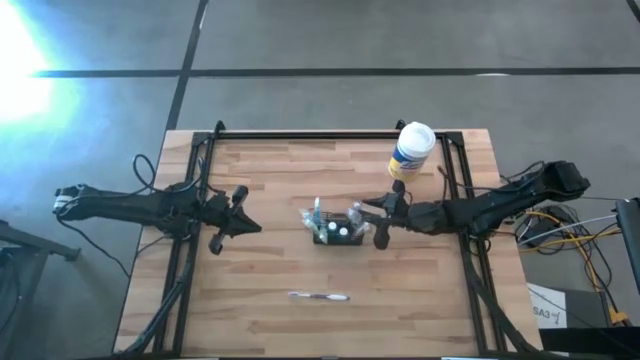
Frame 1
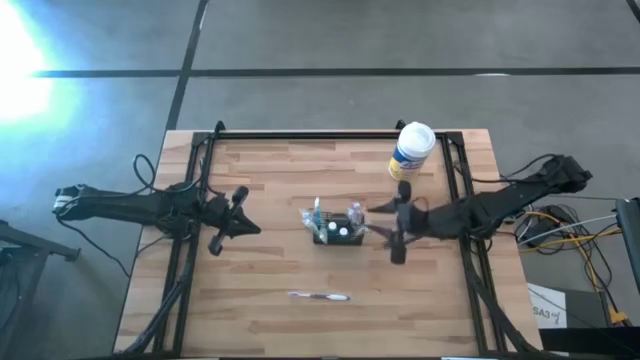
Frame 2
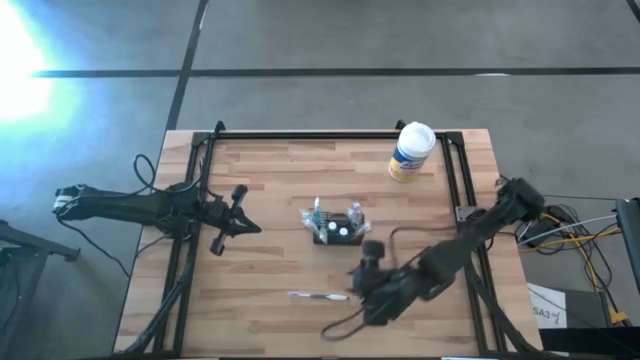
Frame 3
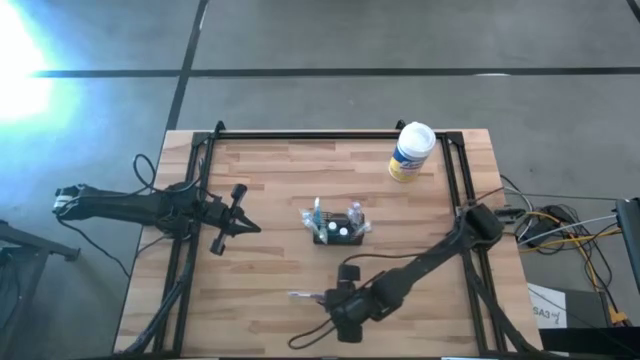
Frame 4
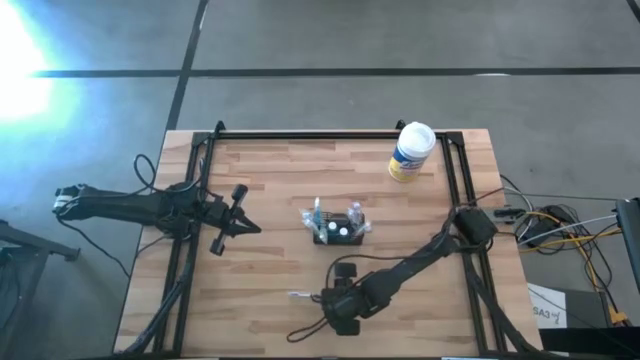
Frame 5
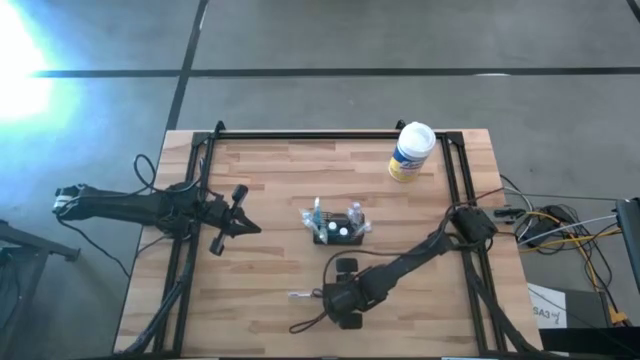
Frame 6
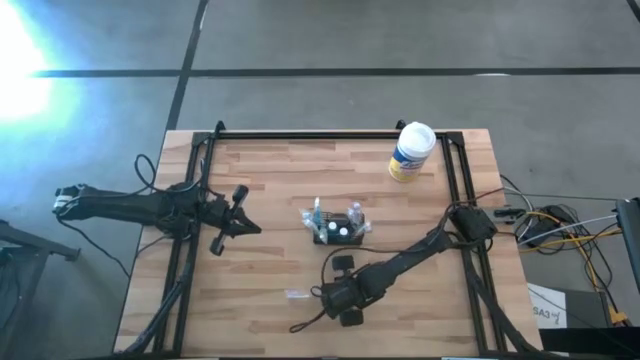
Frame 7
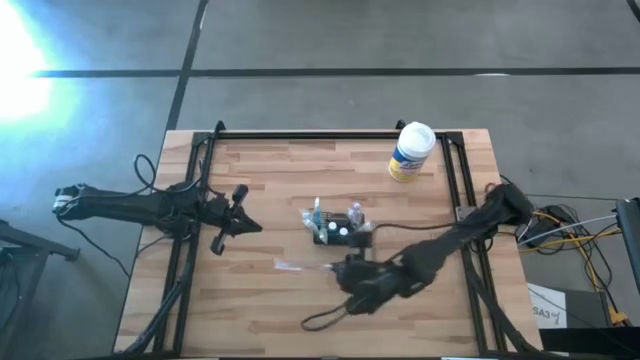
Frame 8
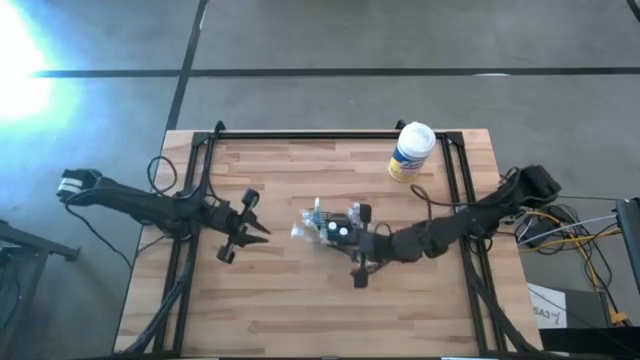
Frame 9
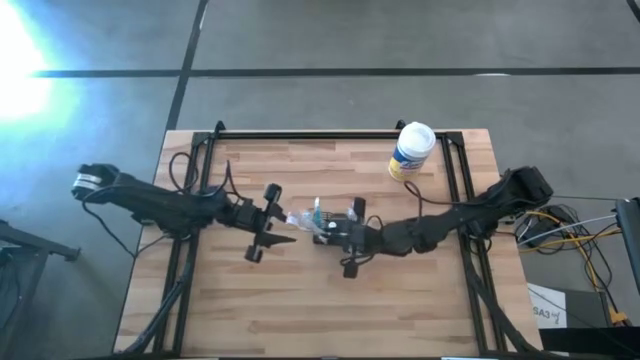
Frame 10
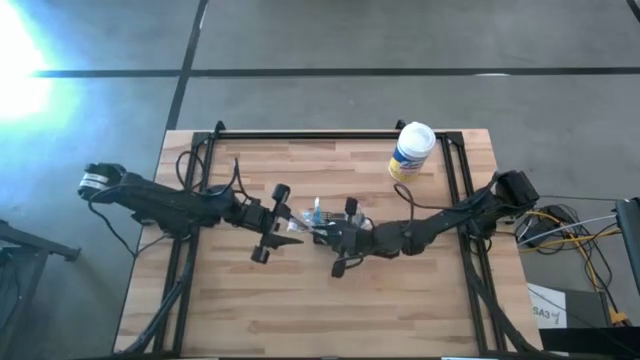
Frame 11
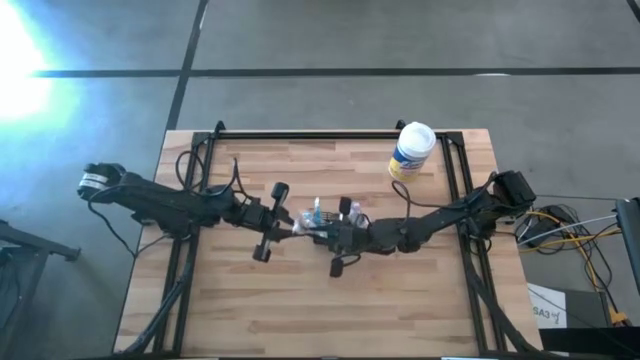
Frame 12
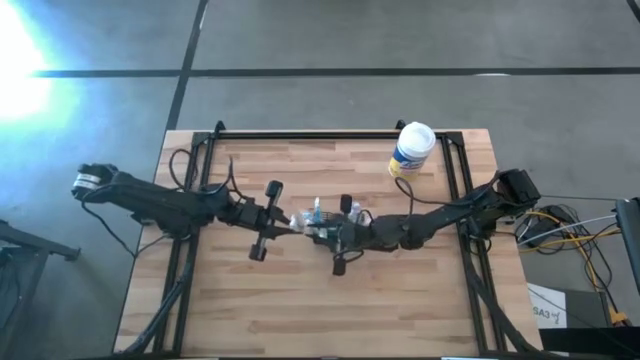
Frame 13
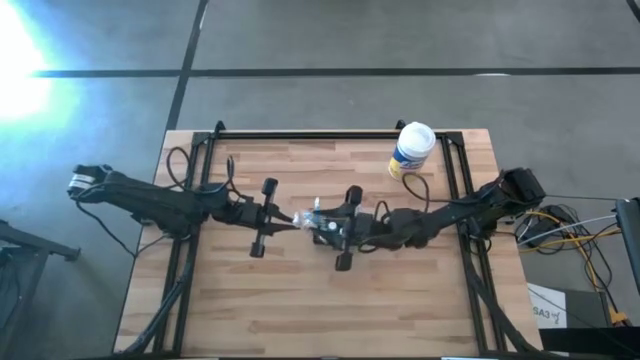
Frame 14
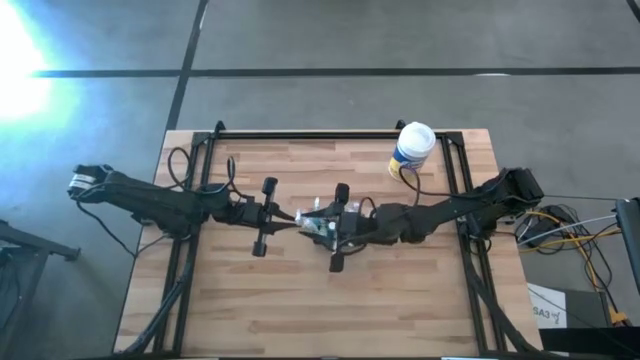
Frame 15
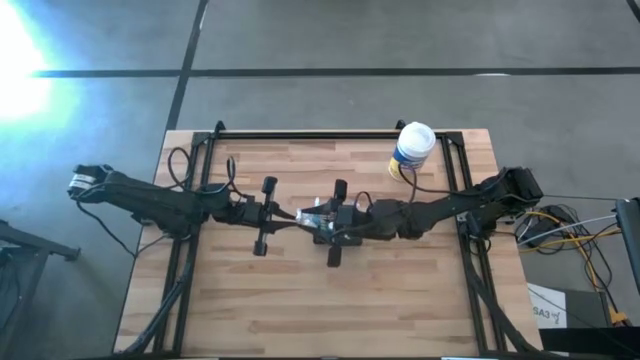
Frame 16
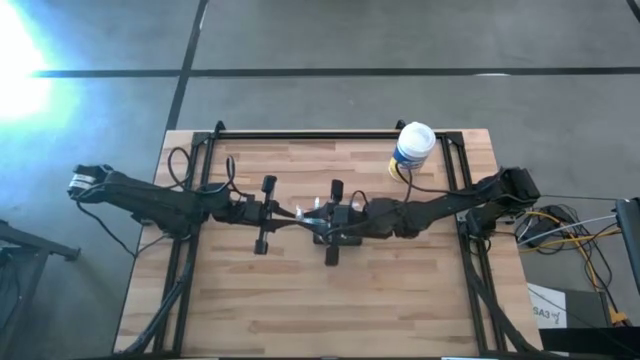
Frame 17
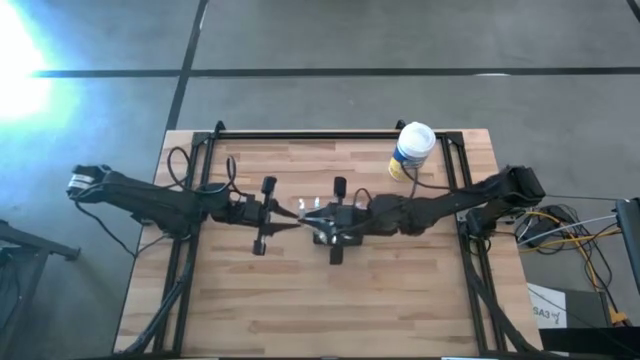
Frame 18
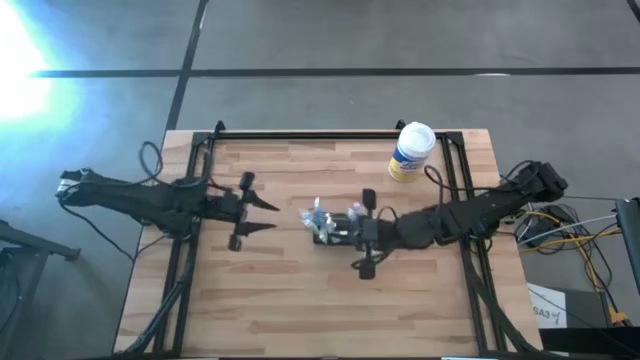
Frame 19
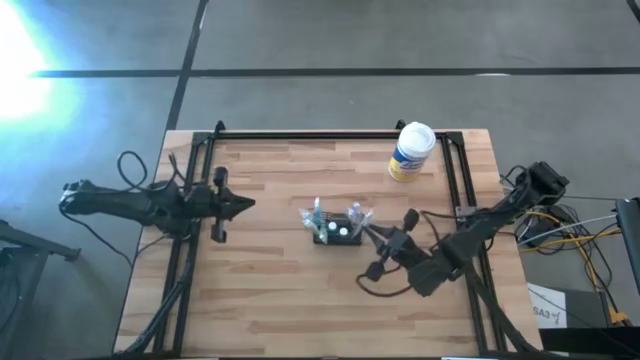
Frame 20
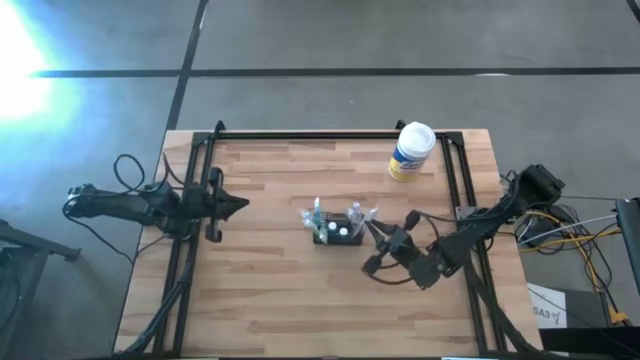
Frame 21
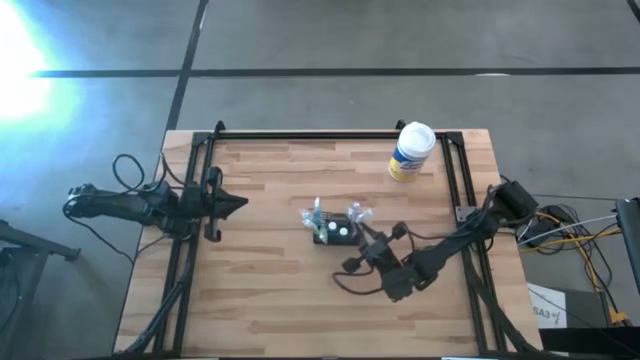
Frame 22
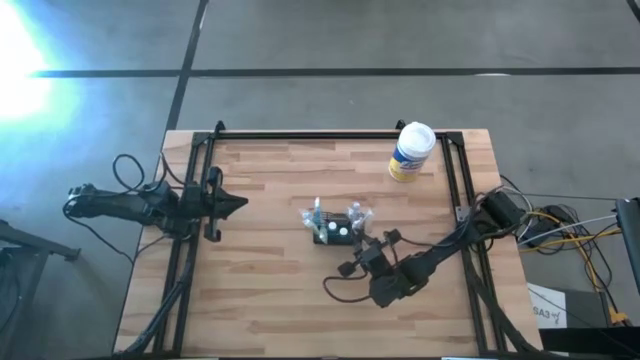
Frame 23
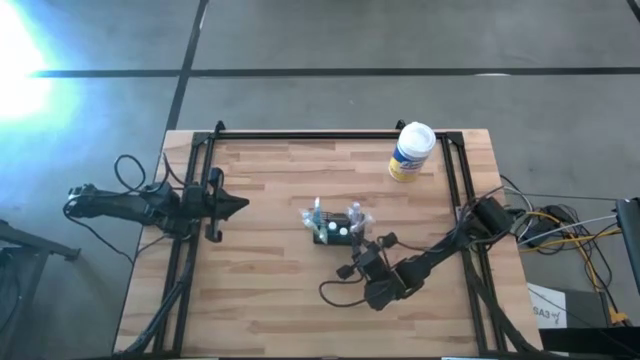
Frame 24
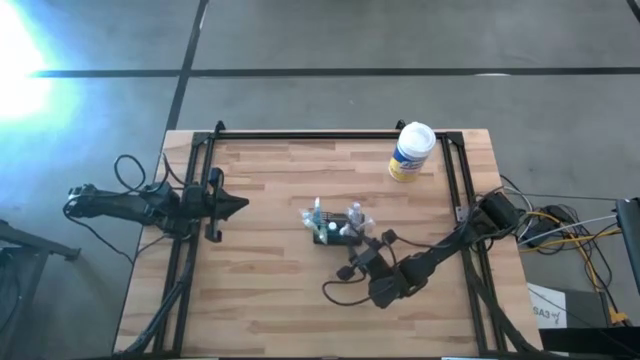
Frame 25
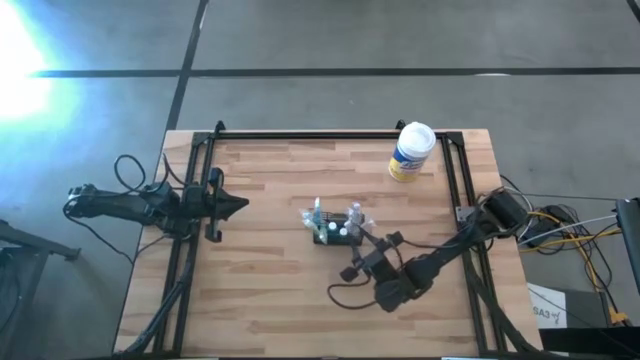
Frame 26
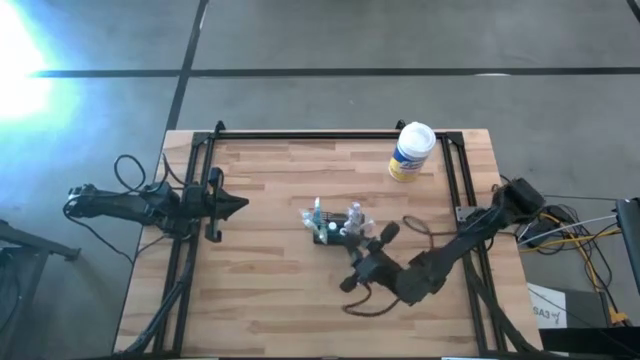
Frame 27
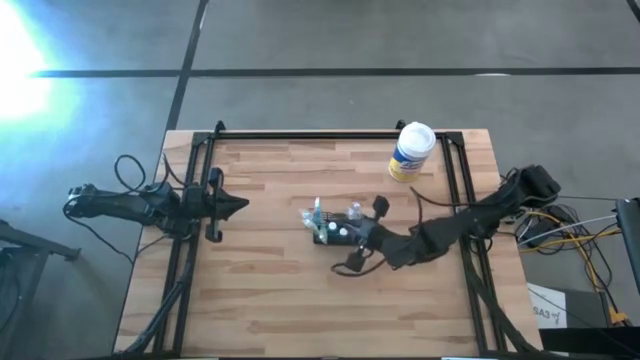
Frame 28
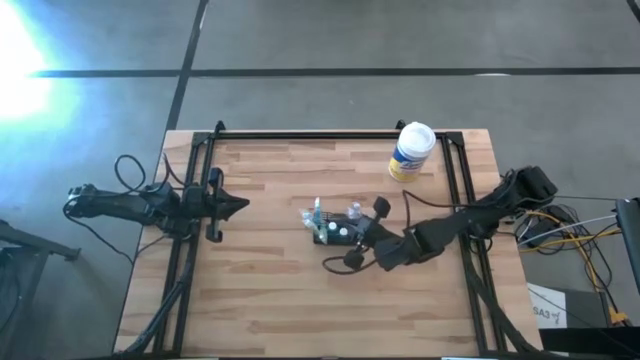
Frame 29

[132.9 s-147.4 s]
Task: Pick & Place toothbrushing station
Put the purple toothbrush into the black mesh organizer

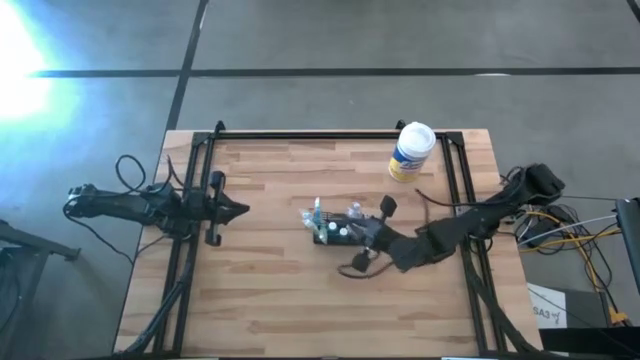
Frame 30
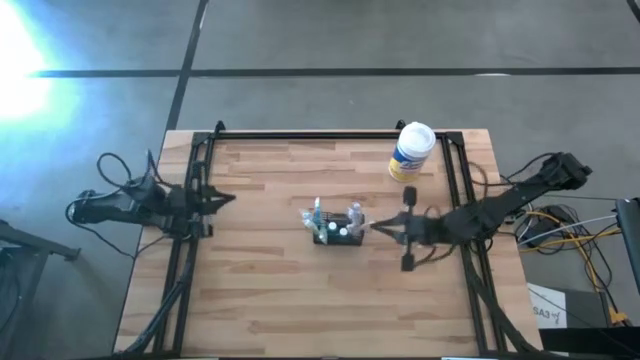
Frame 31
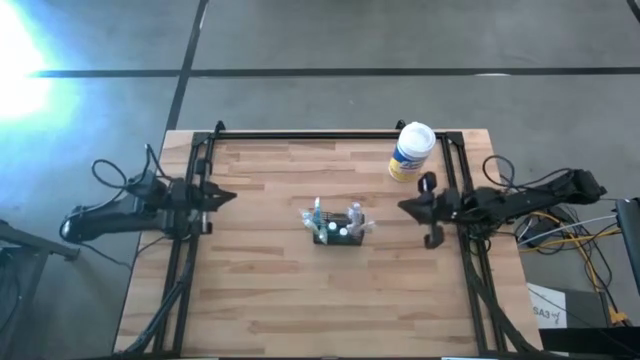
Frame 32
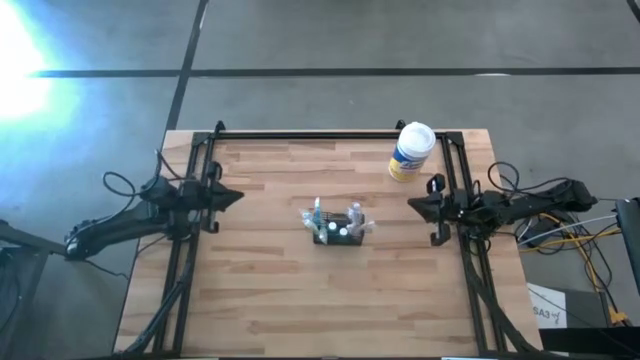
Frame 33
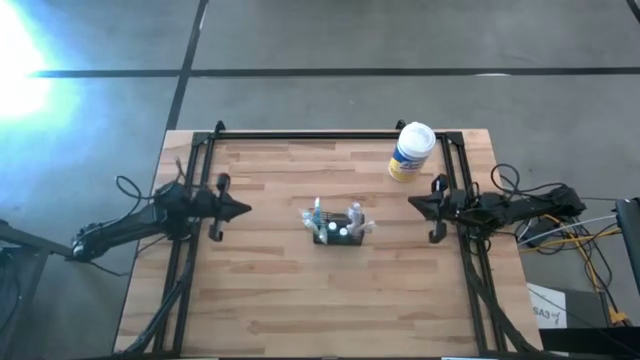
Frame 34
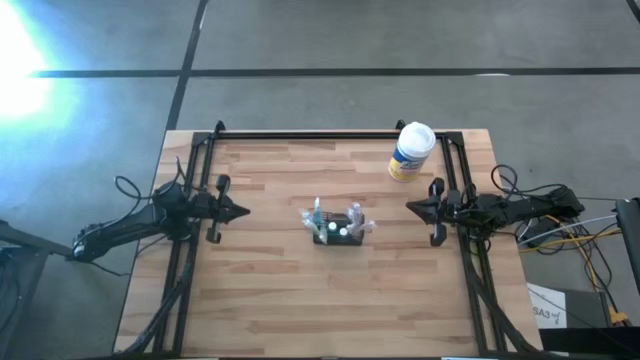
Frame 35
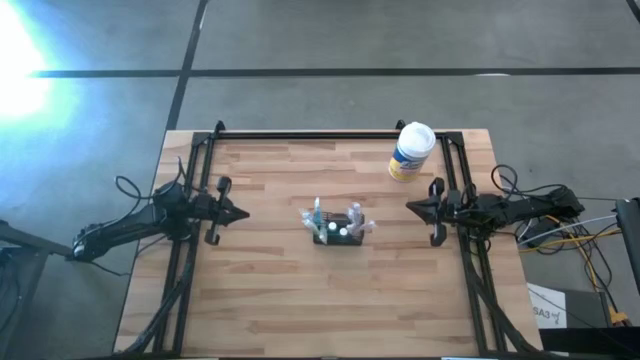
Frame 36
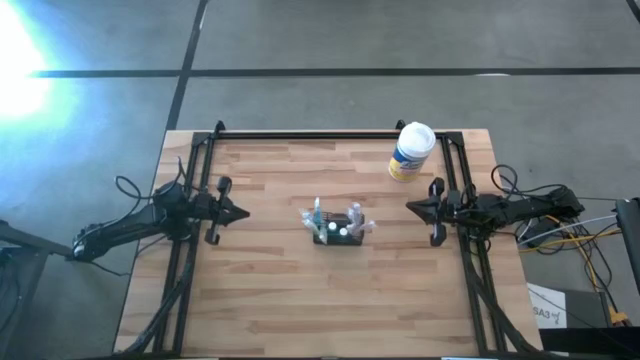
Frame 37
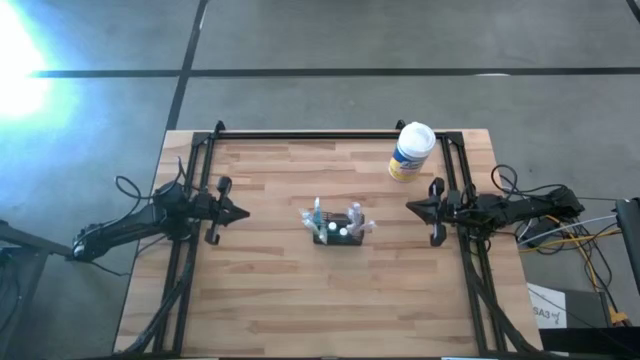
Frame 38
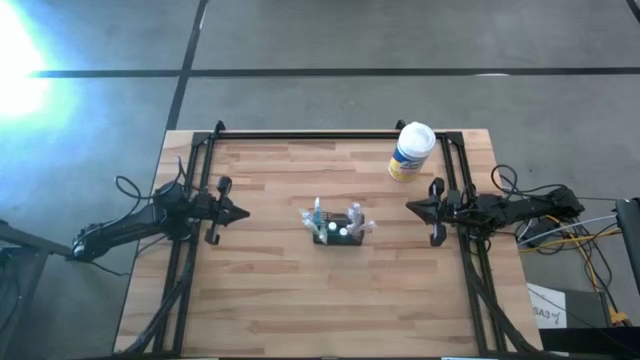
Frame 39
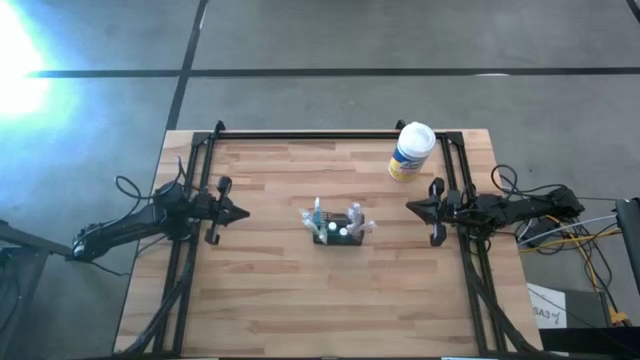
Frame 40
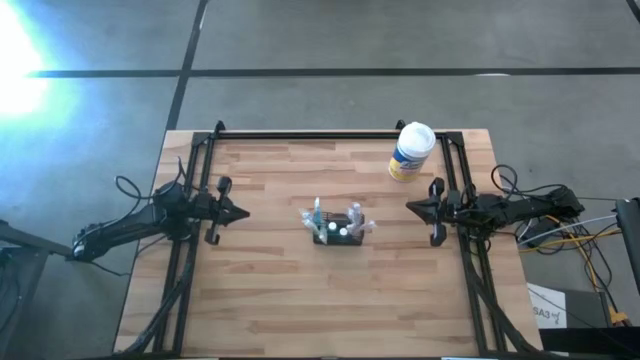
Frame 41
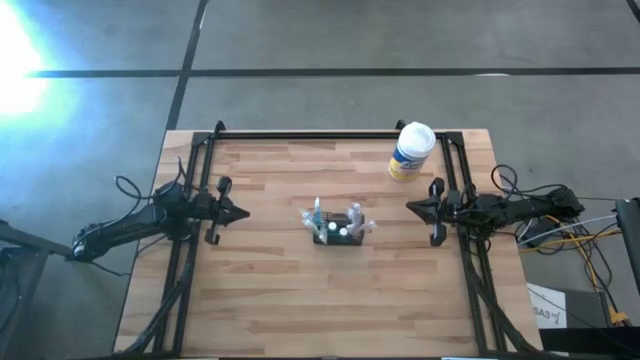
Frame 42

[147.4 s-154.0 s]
Return to Home Position

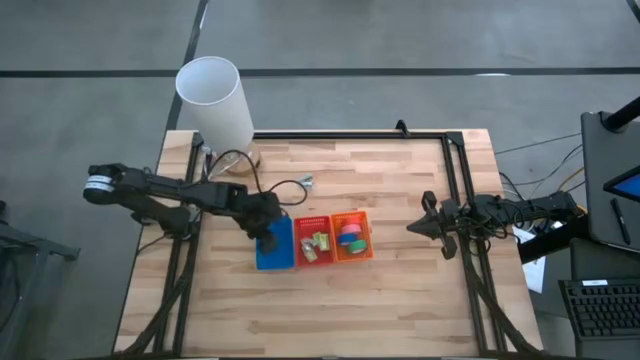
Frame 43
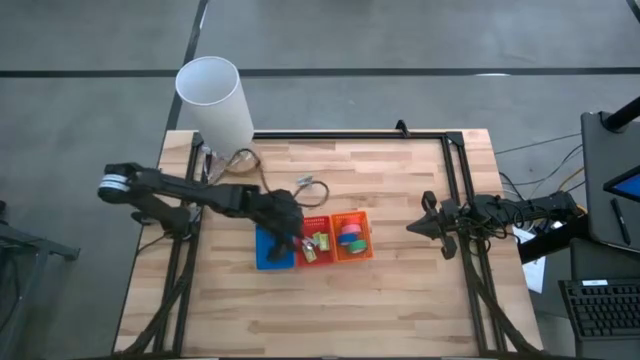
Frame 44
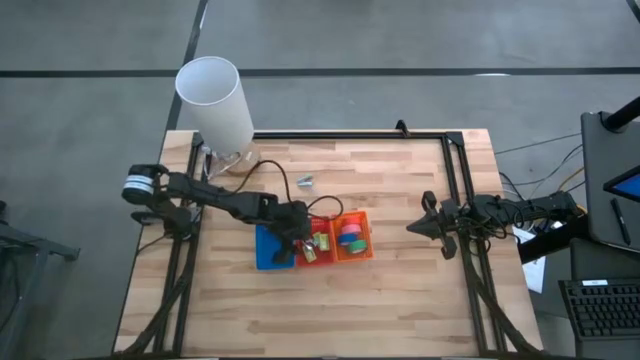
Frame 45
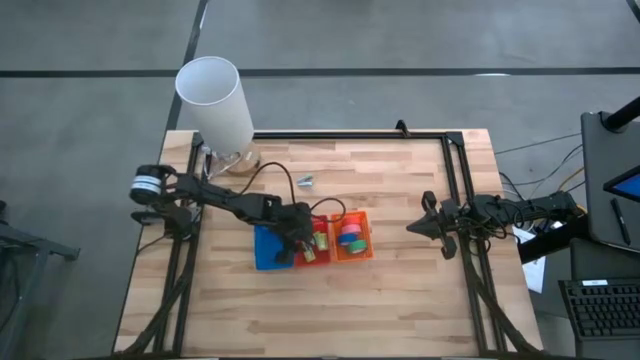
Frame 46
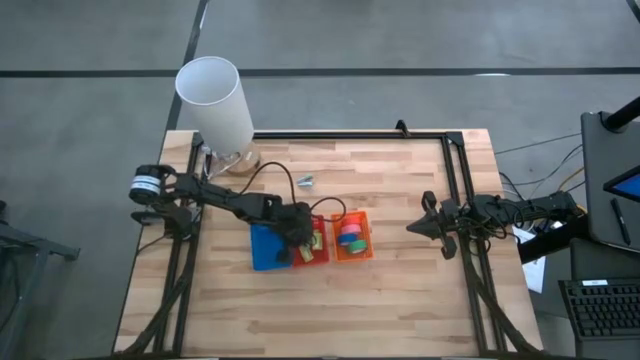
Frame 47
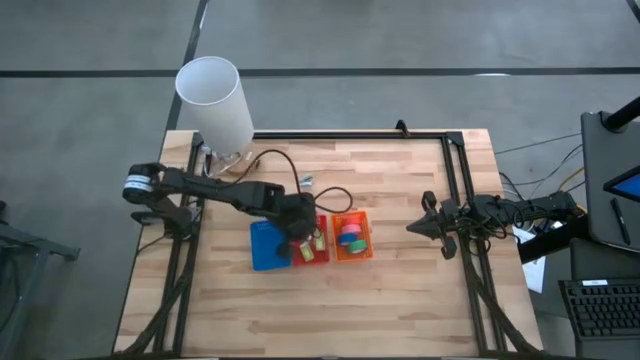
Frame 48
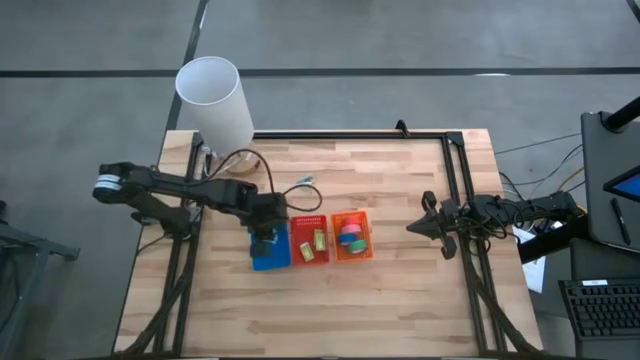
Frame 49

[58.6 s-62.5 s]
Task: Pick and place Stapler, Stapler remover, tape
Put the bottom light blue staple remover into the blue bin
